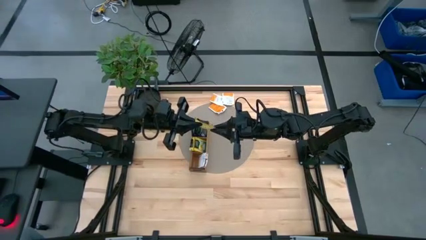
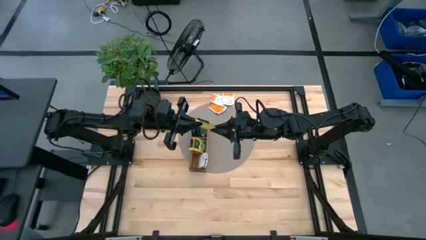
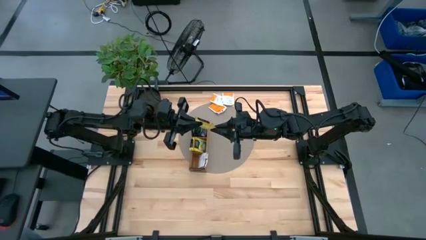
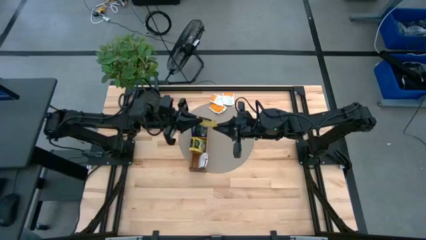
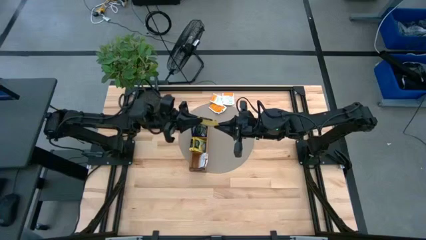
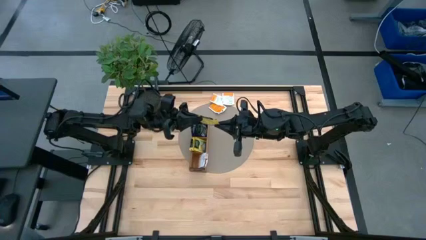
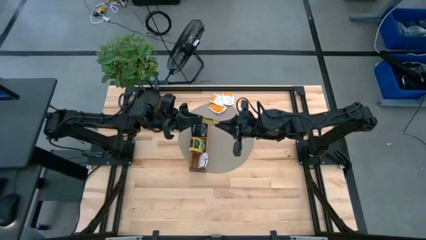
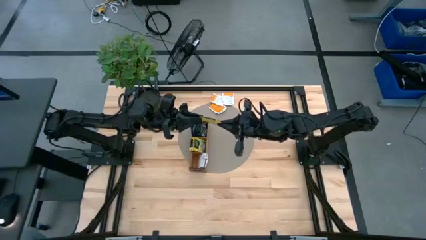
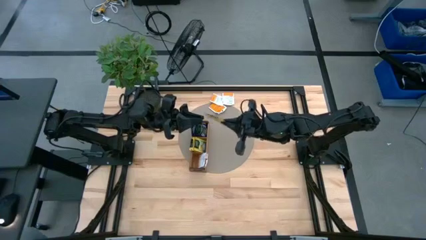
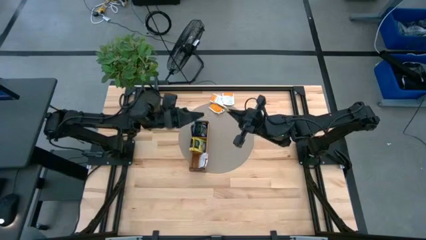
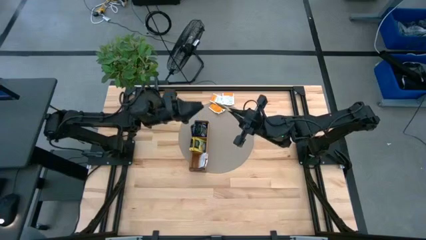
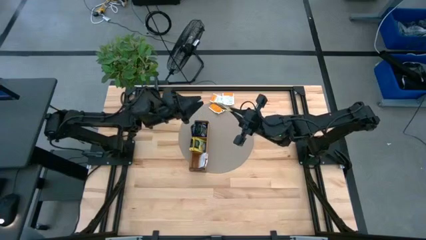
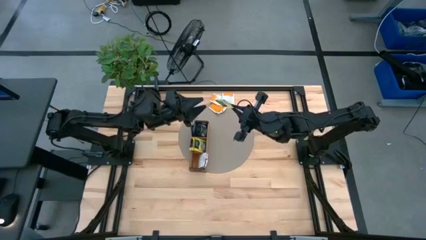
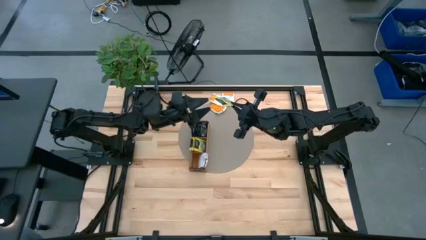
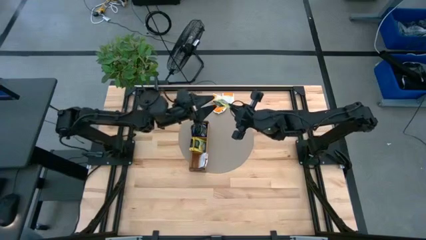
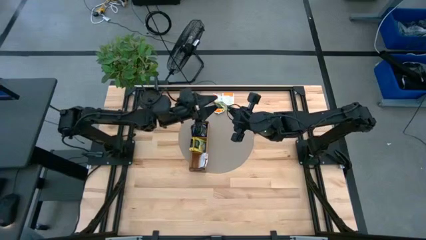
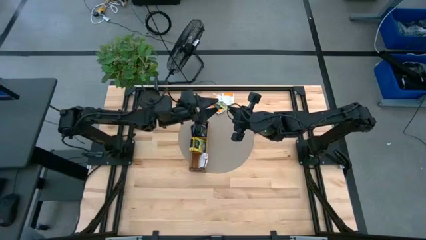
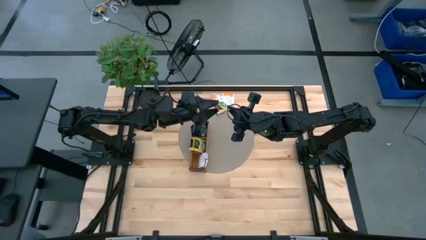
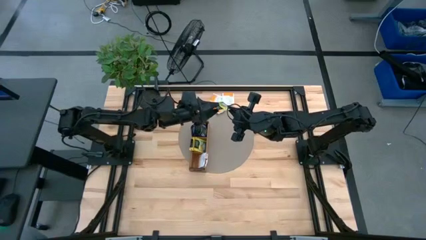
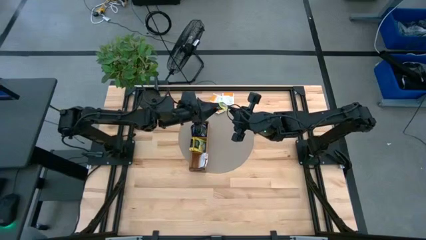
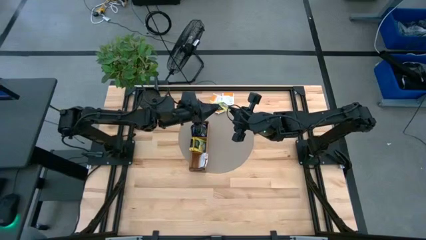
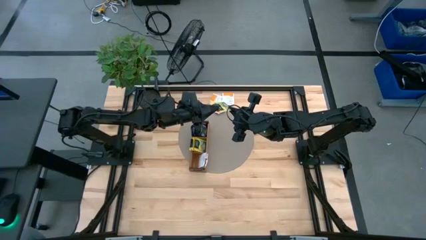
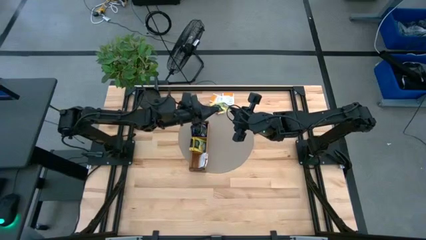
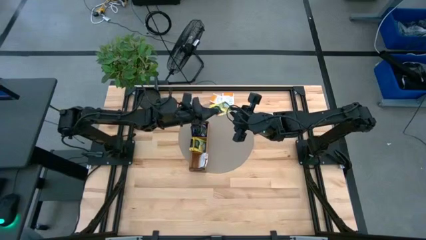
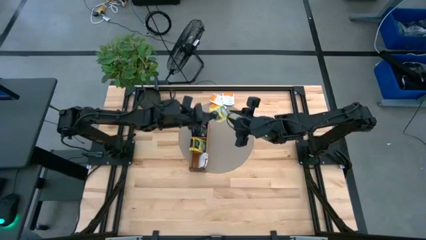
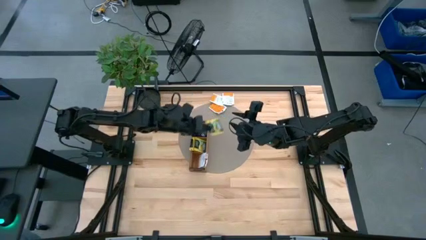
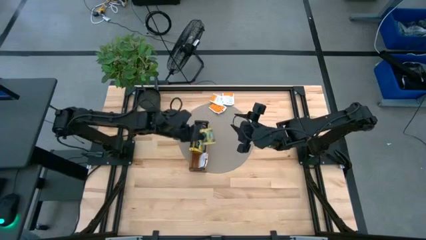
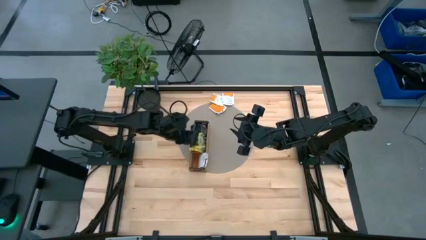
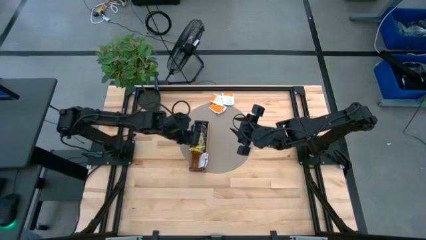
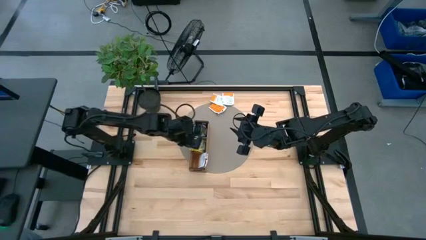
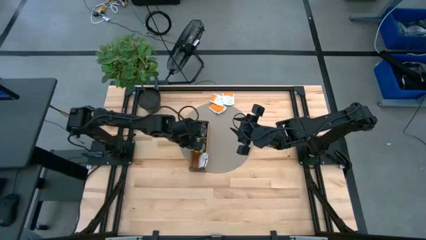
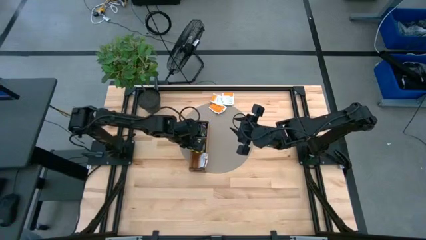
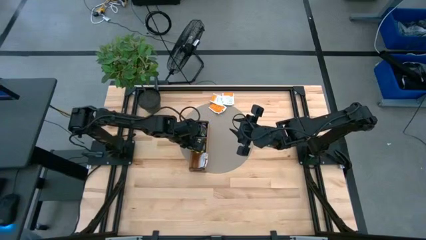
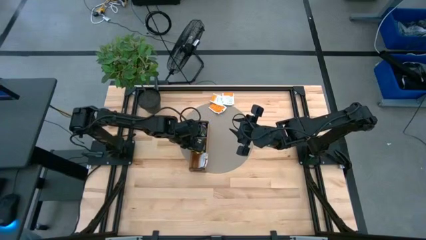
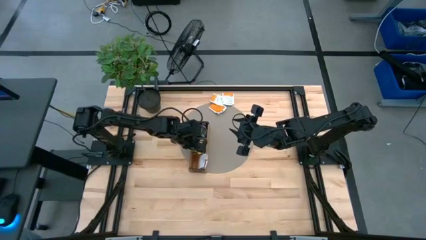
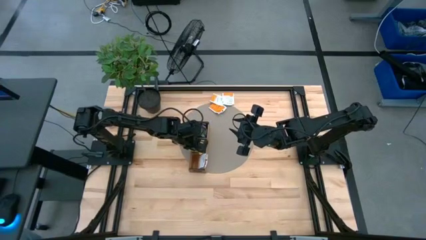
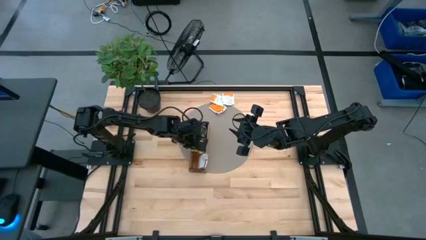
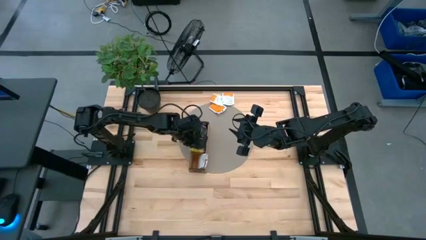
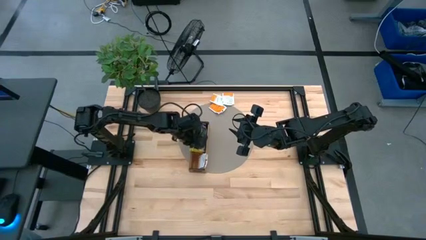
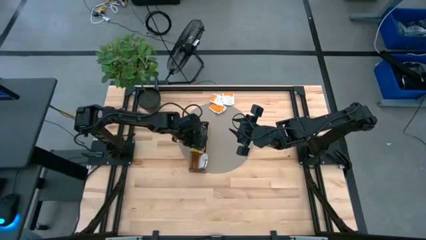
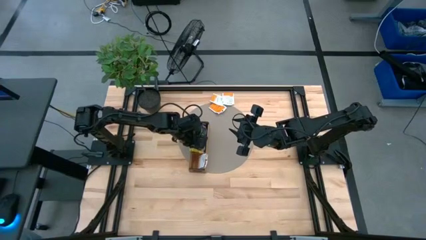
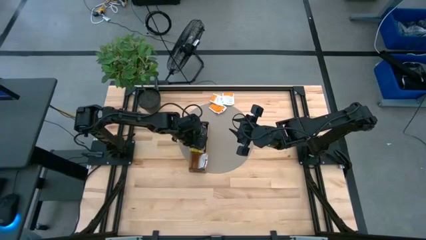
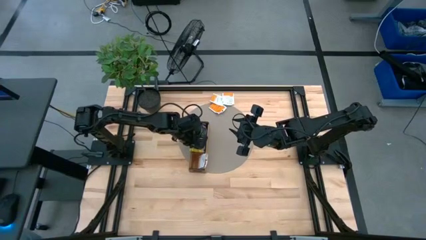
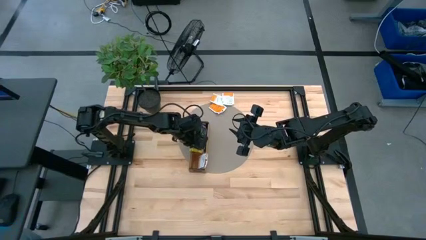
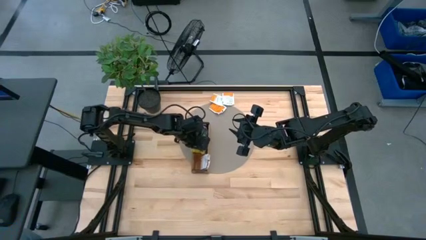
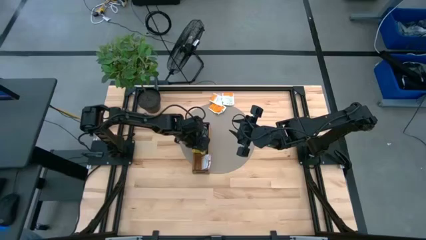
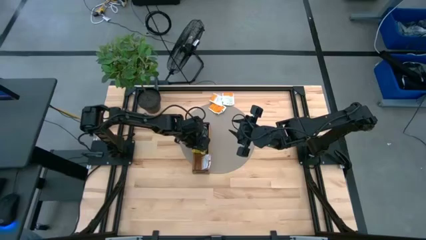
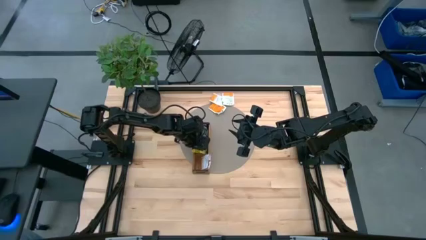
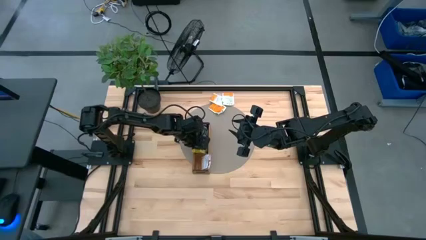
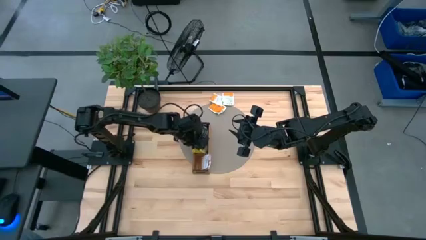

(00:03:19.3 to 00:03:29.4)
Task: Pick & Place Tea
Put the yellow tea bag into the middle section of the wooden organizer
